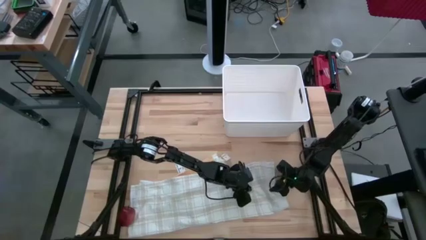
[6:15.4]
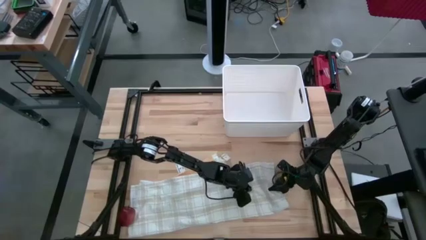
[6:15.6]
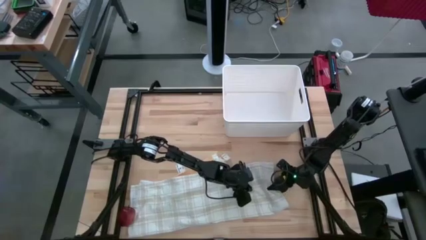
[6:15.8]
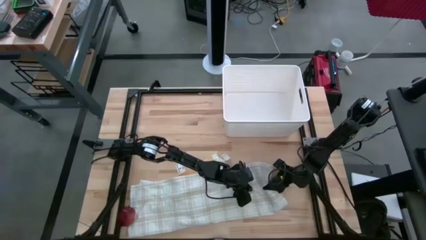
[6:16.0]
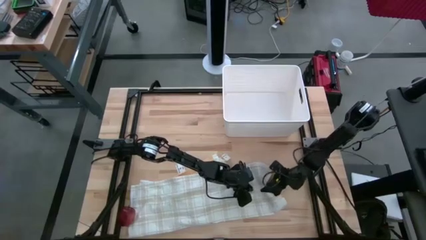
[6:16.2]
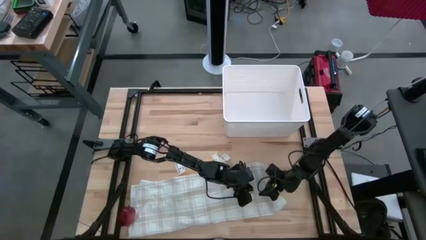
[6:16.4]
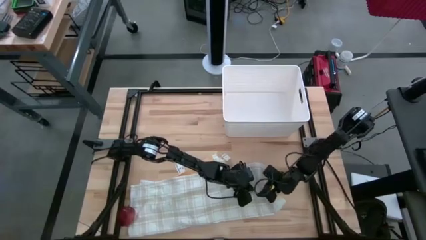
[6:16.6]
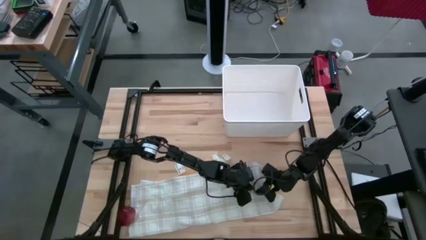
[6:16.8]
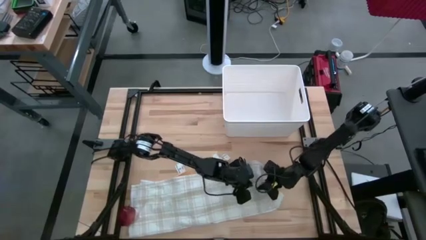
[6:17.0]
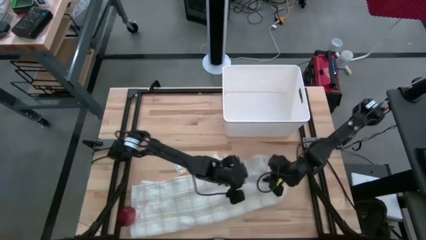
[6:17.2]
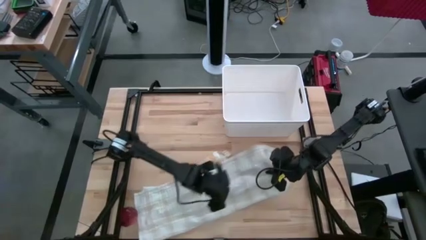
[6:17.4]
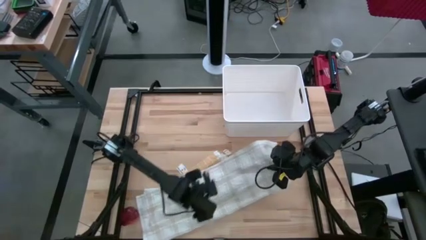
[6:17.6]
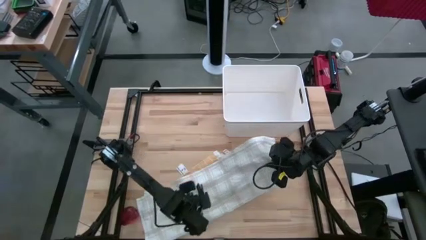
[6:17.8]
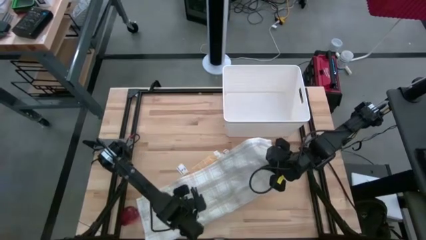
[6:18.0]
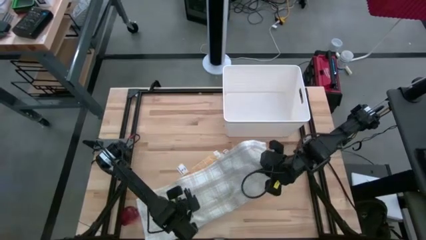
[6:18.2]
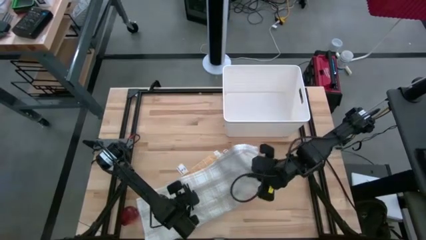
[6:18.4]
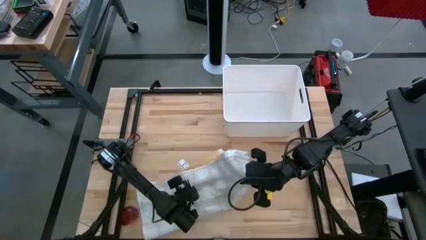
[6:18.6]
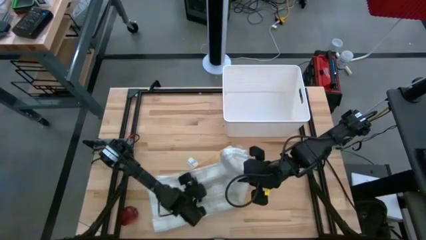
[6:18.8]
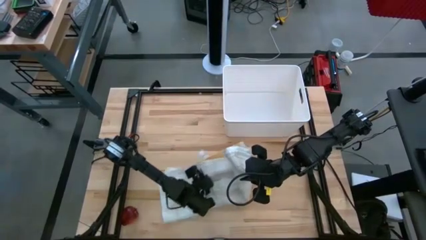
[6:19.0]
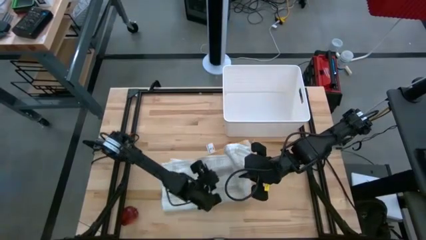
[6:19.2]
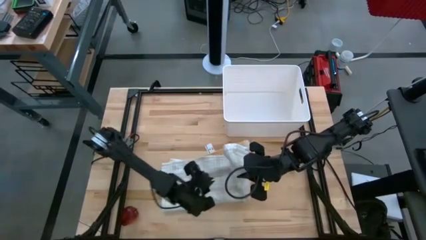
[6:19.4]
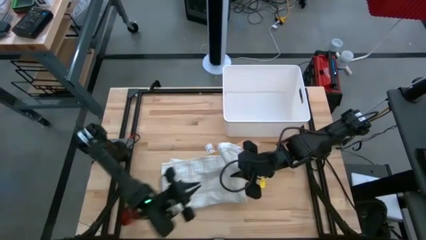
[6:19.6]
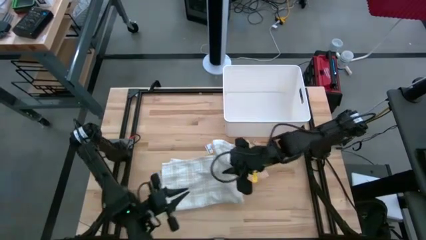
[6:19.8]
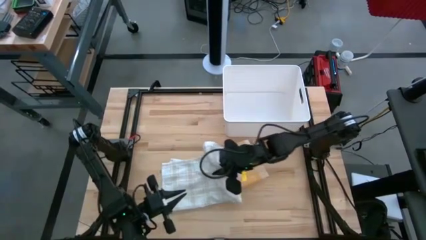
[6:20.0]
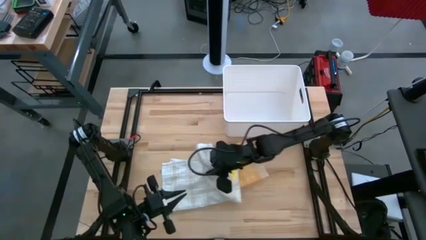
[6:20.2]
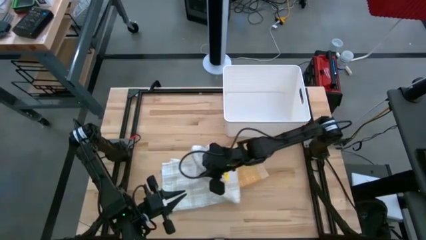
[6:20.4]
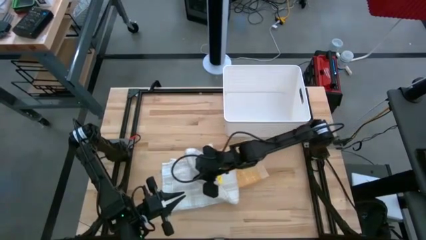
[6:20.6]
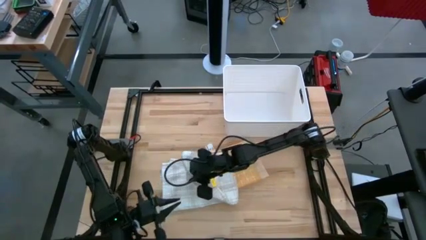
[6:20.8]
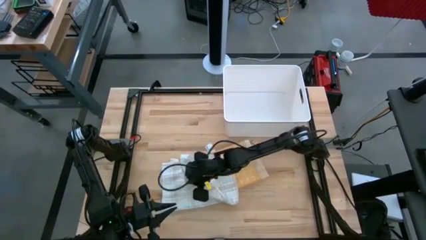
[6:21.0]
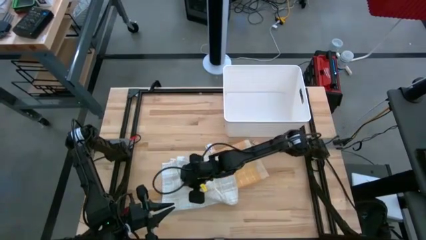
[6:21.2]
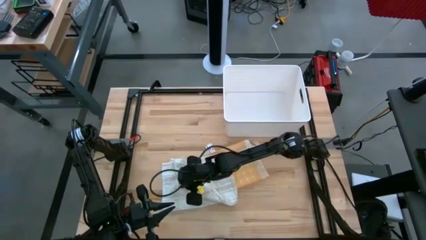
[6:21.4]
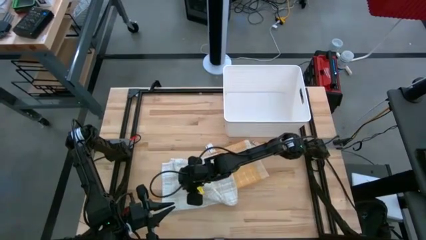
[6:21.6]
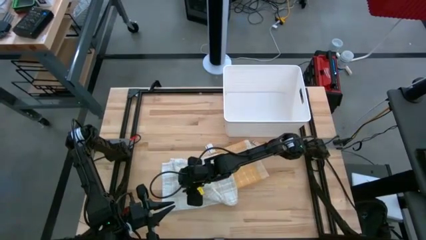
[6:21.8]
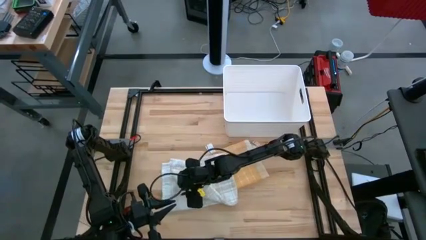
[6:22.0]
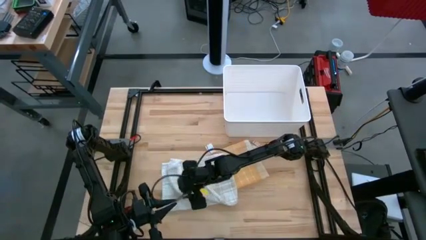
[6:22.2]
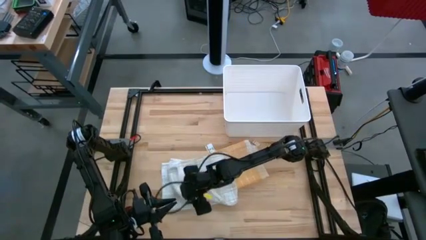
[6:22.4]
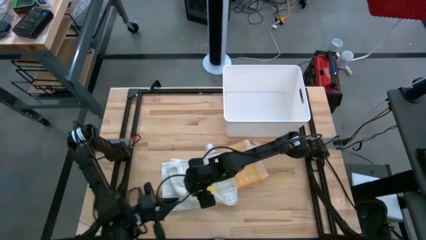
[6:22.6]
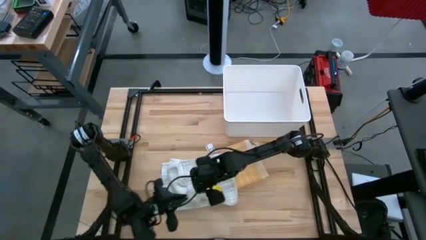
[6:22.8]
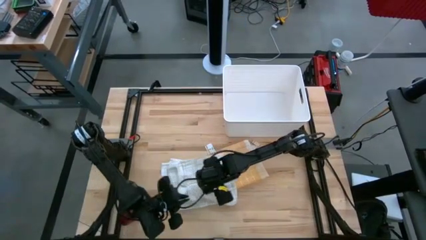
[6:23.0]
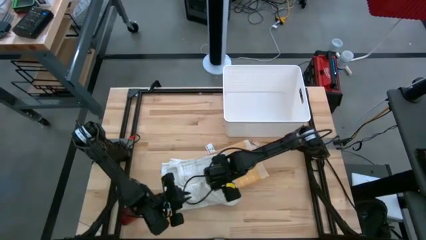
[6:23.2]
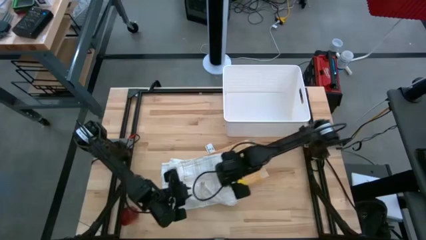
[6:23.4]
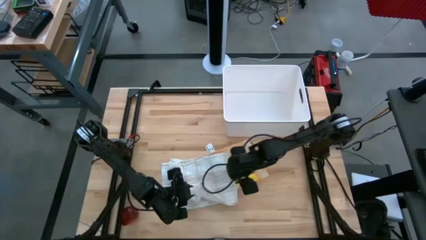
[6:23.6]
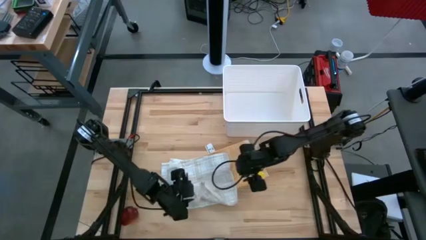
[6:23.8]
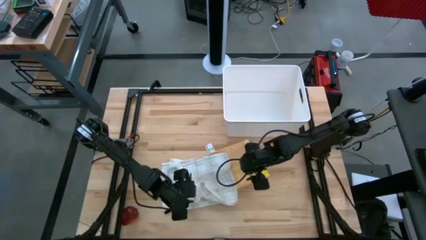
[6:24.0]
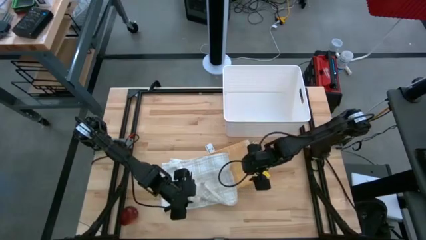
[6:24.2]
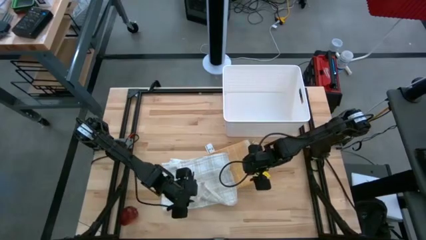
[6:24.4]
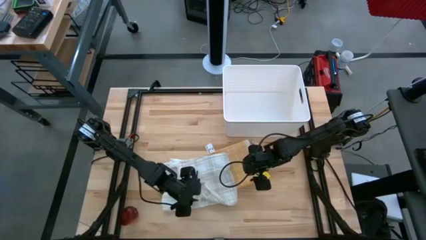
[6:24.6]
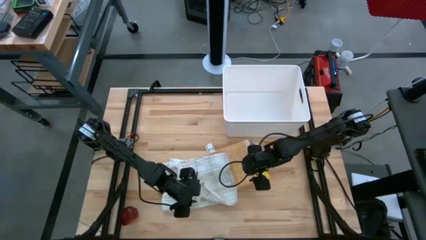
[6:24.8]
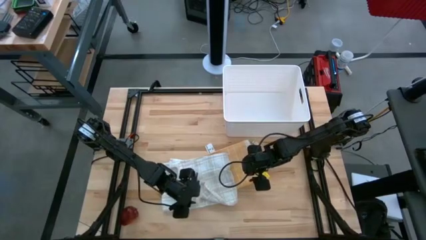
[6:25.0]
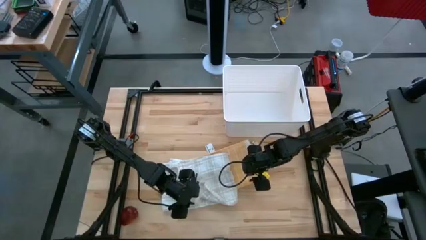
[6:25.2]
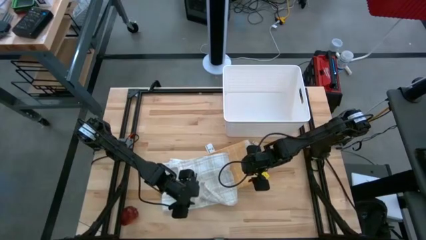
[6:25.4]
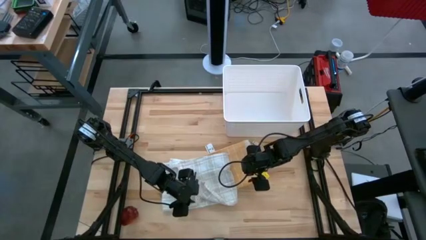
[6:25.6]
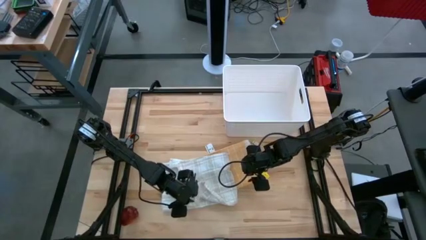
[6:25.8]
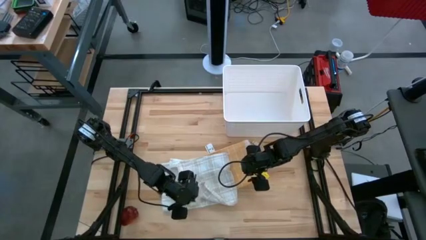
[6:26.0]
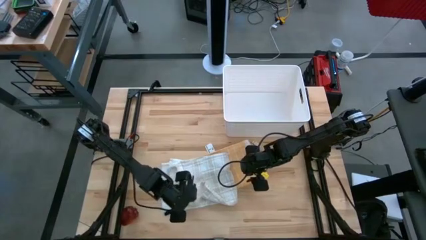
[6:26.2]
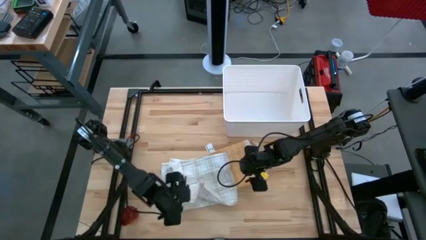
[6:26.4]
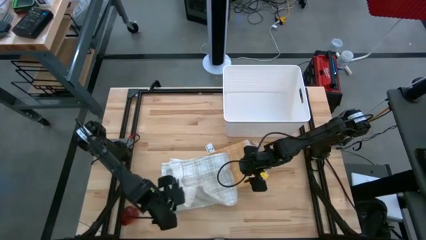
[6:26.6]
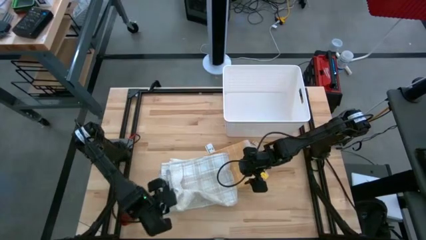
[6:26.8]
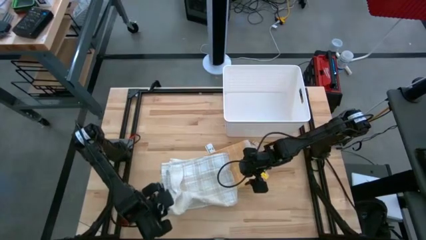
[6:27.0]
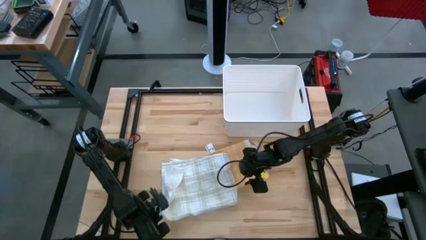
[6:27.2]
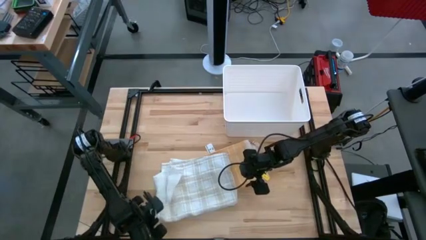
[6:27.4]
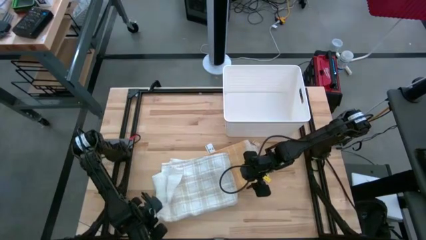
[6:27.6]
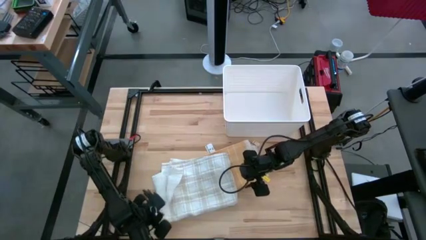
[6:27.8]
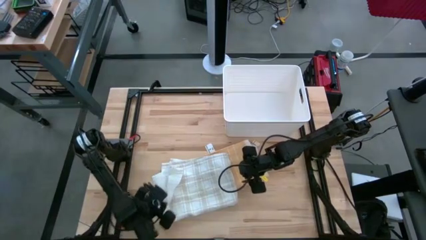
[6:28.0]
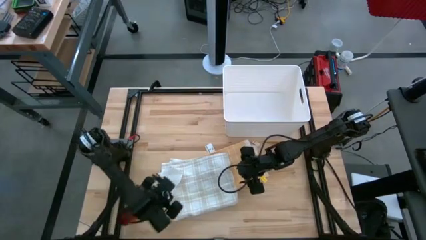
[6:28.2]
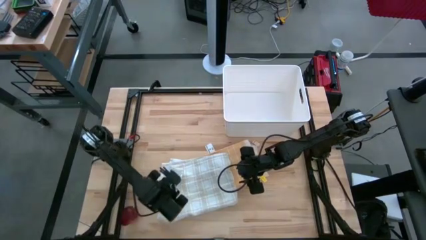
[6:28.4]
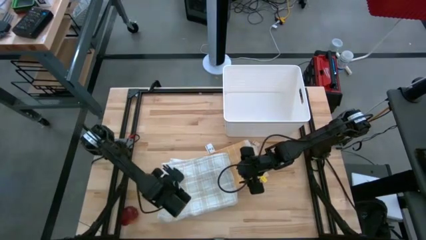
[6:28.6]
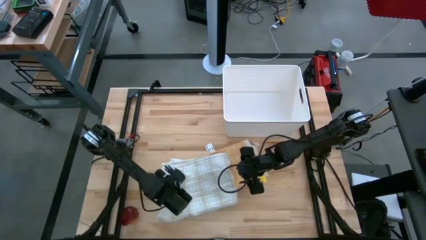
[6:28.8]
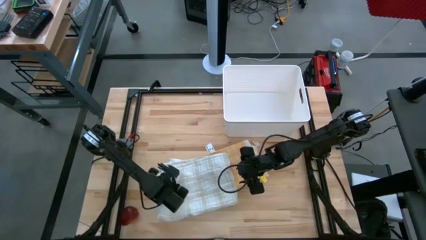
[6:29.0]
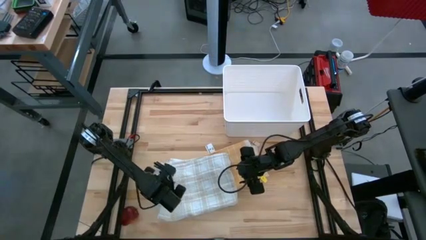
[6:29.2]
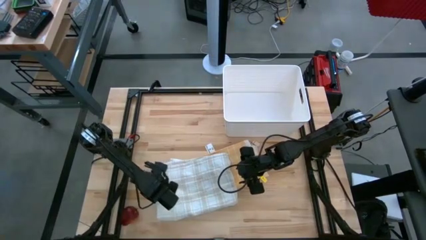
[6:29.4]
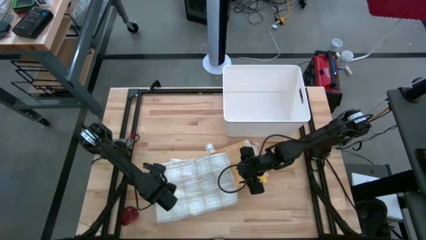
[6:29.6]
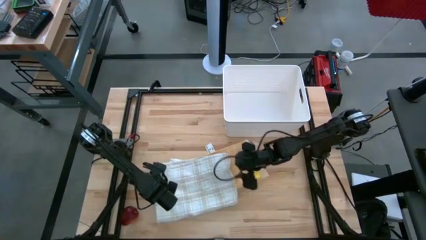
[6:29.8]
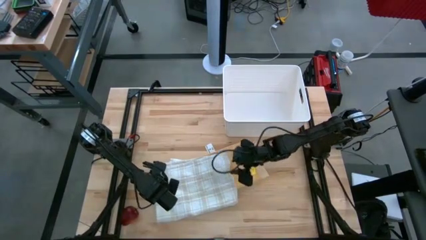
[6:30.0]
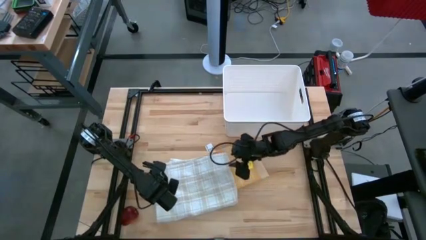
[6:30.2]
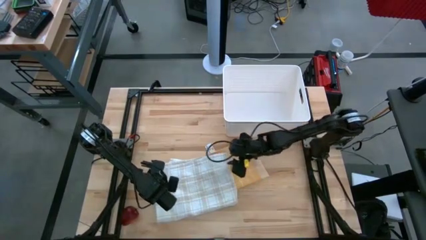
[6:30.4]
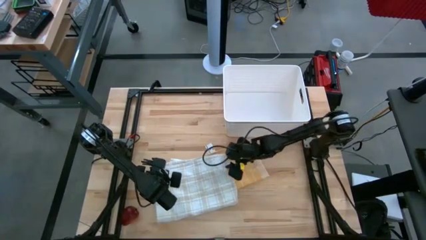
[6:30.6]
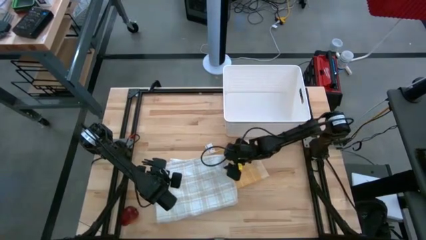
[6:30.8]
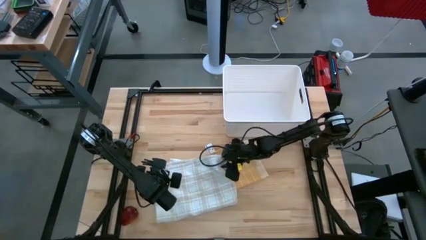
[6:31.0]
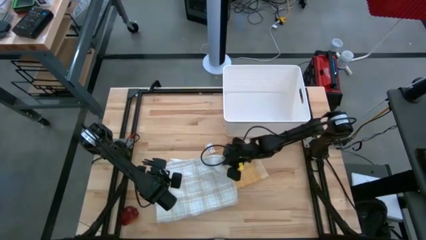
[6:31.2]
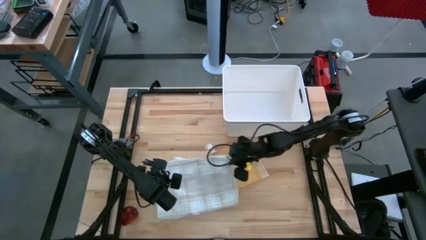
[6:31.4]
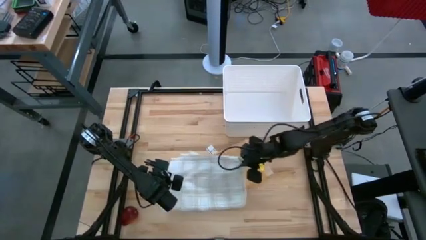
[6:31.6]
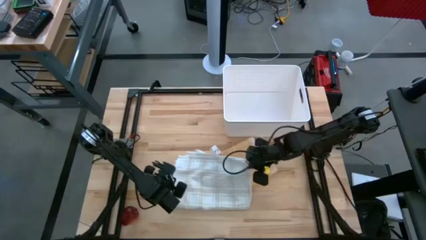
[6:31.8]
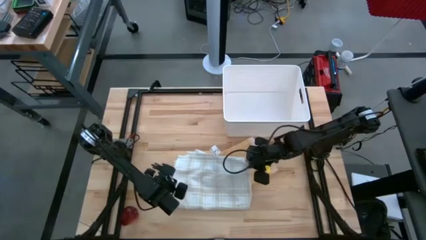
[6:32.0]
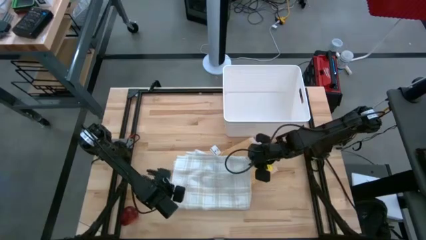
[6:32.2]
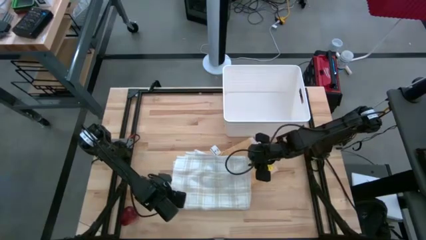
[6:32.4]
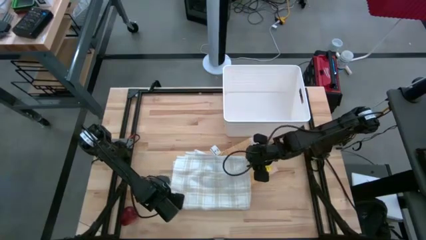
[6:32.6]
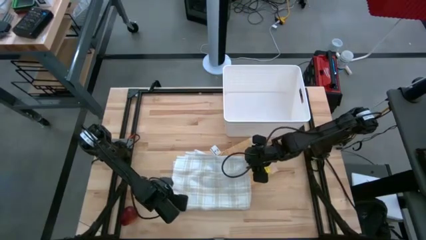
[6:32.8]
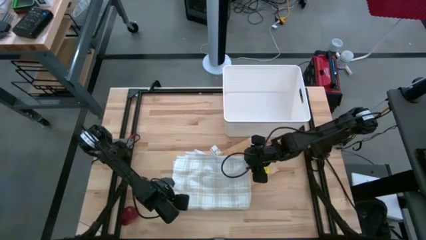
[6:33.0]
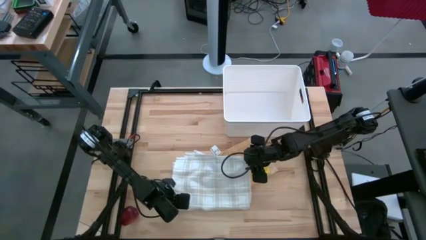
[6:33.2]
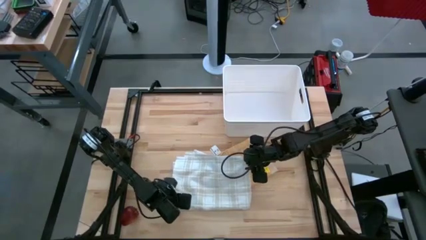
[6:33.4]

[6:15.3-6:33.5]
Task: Fold towel
Fold the white checkered towel
